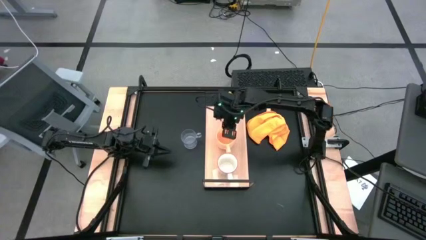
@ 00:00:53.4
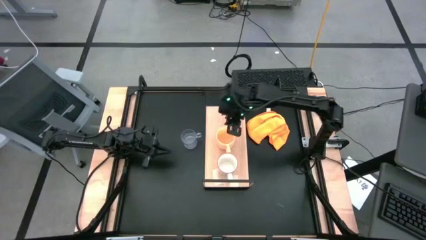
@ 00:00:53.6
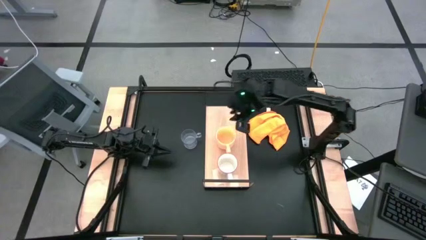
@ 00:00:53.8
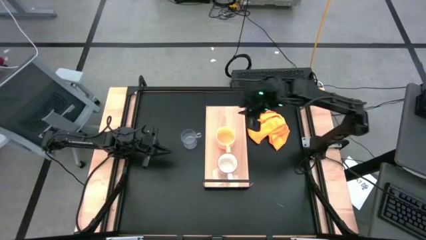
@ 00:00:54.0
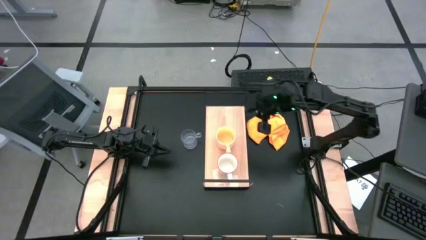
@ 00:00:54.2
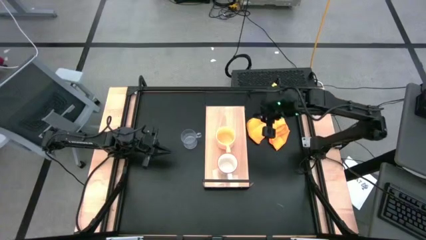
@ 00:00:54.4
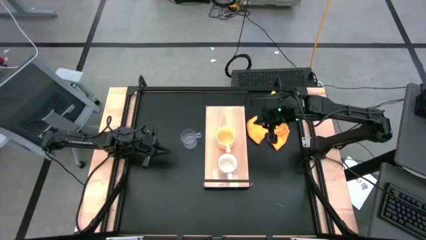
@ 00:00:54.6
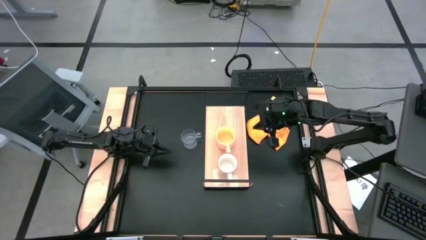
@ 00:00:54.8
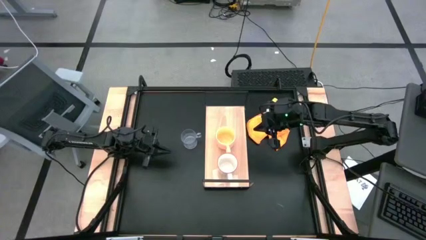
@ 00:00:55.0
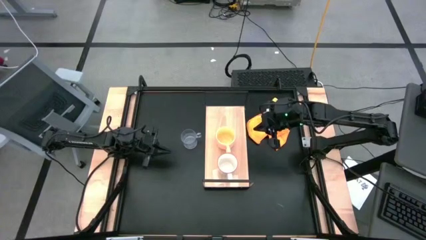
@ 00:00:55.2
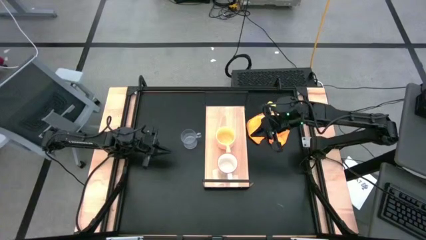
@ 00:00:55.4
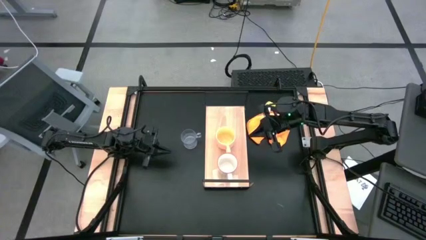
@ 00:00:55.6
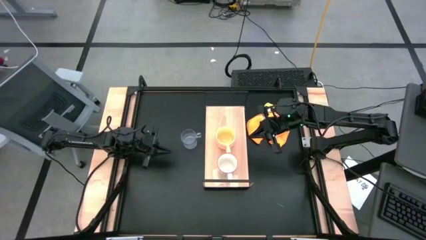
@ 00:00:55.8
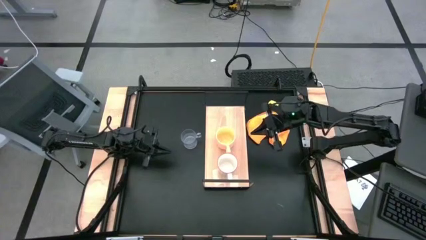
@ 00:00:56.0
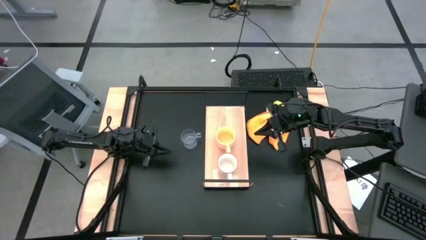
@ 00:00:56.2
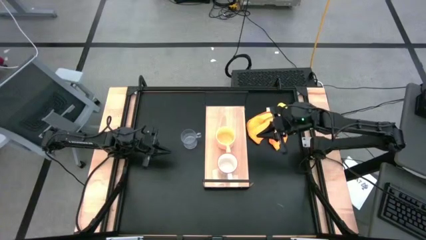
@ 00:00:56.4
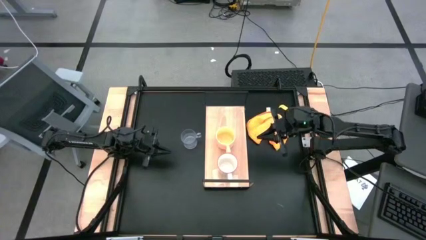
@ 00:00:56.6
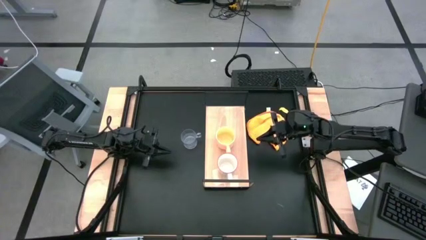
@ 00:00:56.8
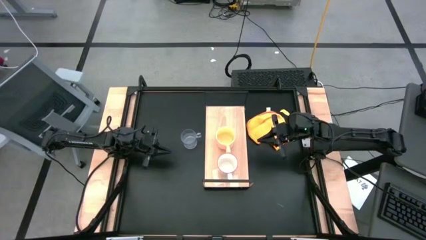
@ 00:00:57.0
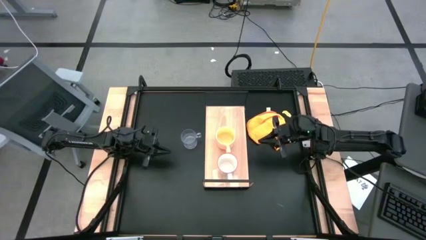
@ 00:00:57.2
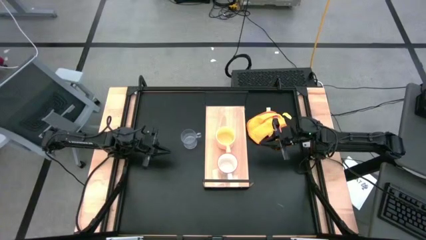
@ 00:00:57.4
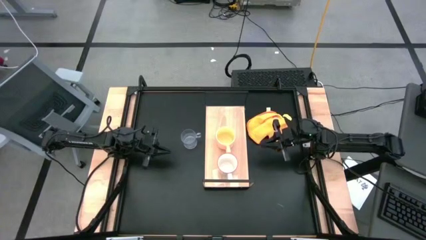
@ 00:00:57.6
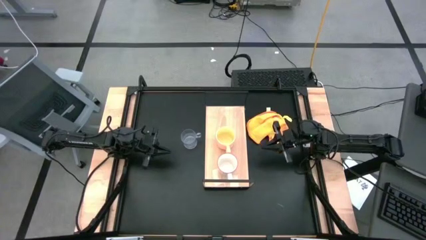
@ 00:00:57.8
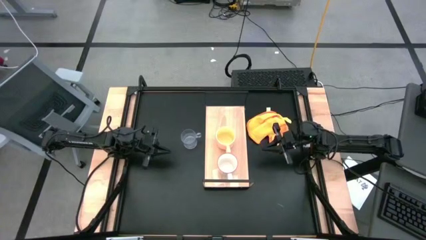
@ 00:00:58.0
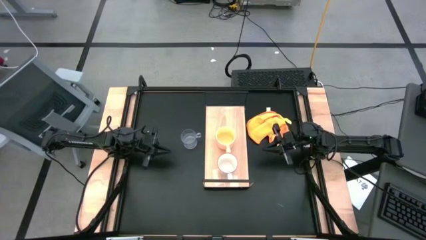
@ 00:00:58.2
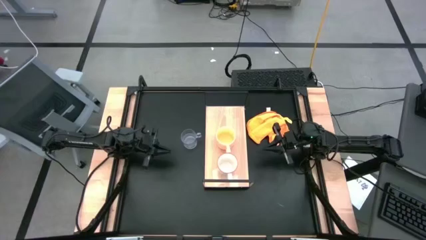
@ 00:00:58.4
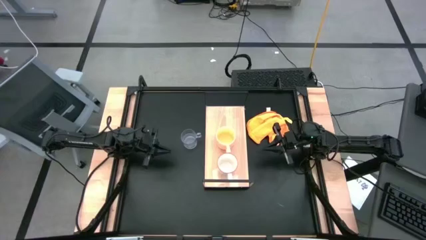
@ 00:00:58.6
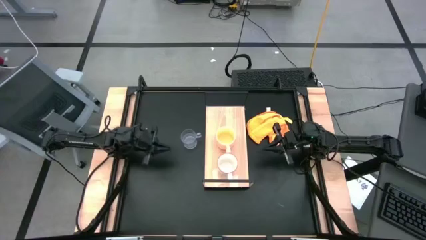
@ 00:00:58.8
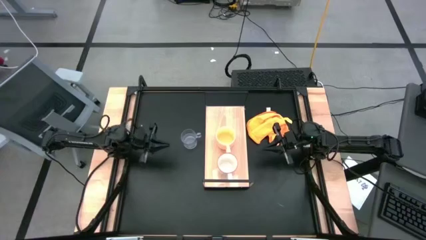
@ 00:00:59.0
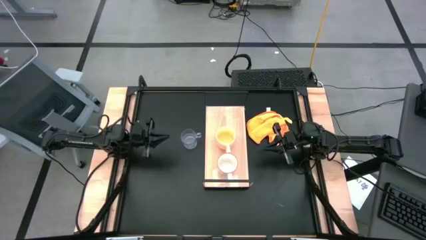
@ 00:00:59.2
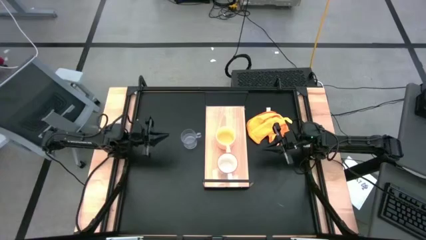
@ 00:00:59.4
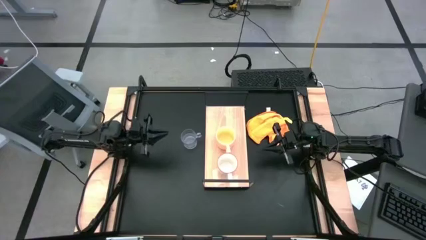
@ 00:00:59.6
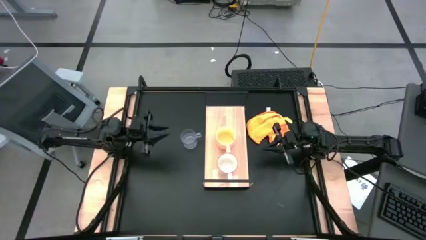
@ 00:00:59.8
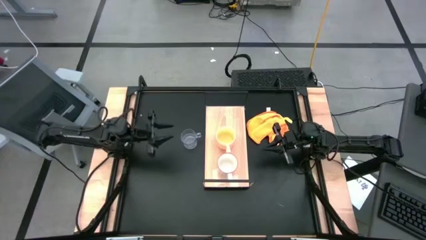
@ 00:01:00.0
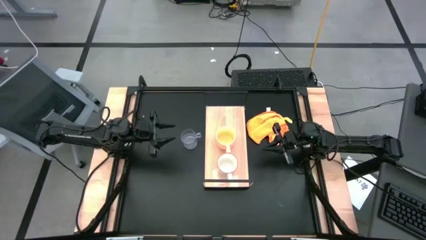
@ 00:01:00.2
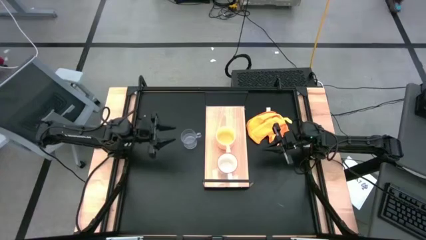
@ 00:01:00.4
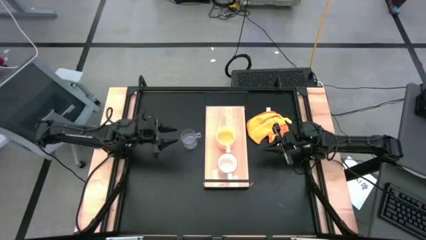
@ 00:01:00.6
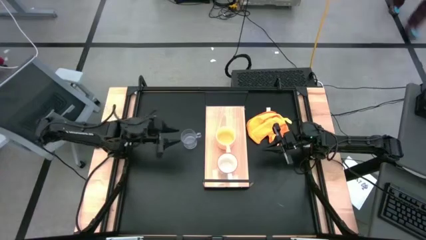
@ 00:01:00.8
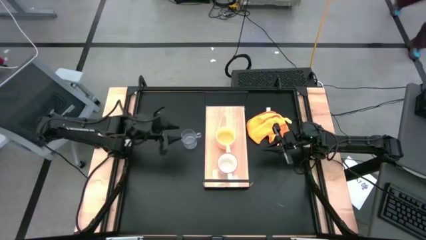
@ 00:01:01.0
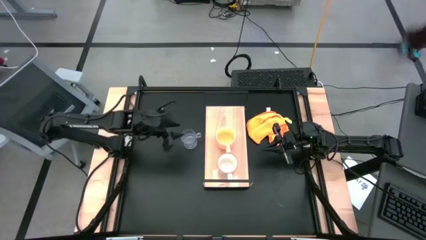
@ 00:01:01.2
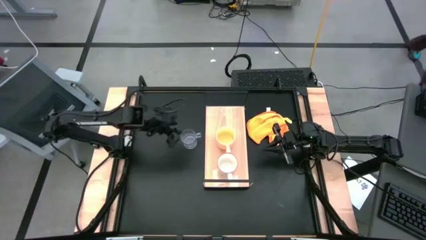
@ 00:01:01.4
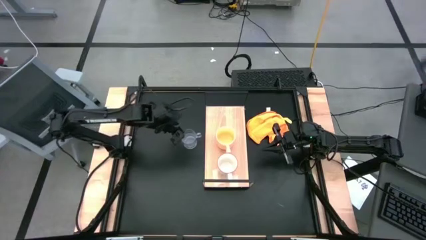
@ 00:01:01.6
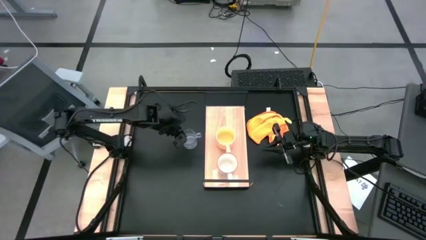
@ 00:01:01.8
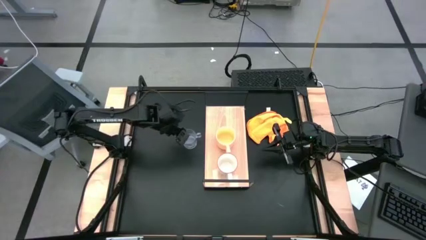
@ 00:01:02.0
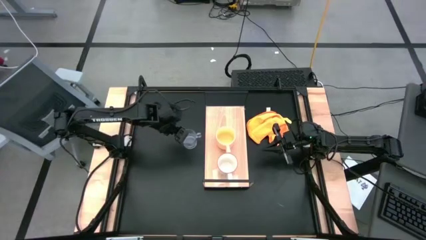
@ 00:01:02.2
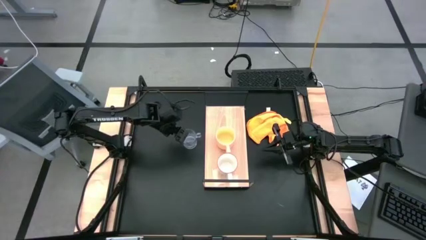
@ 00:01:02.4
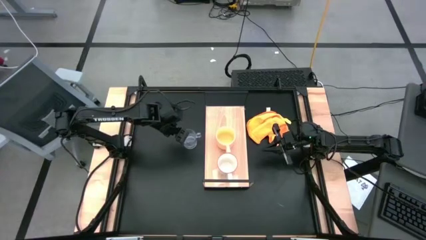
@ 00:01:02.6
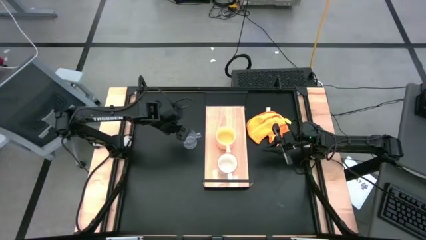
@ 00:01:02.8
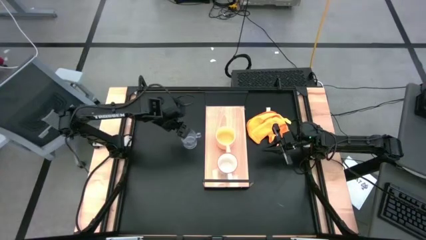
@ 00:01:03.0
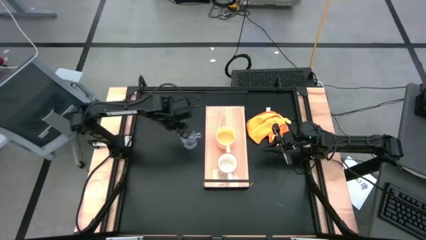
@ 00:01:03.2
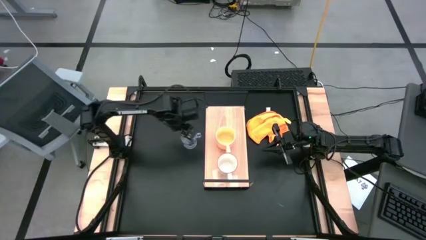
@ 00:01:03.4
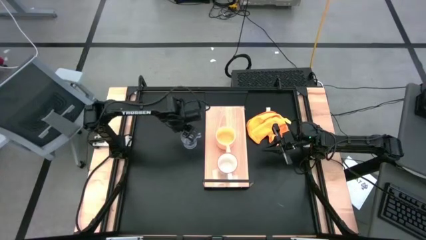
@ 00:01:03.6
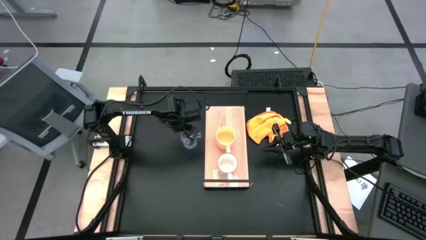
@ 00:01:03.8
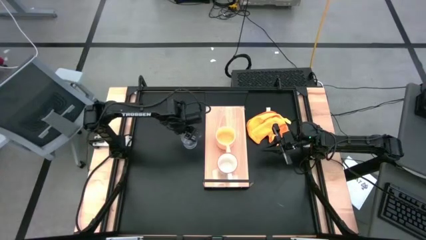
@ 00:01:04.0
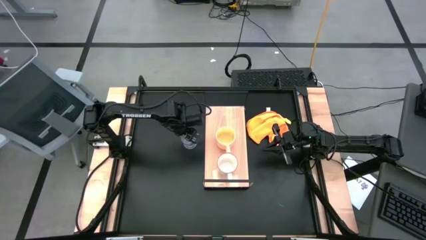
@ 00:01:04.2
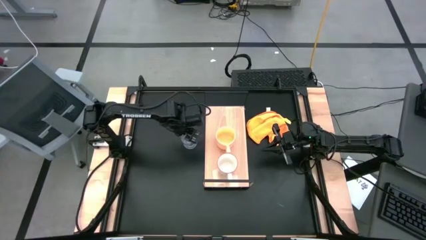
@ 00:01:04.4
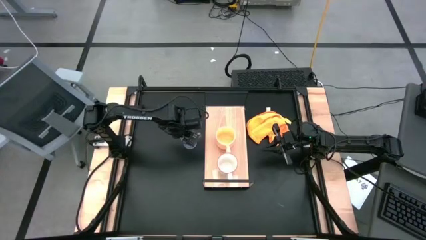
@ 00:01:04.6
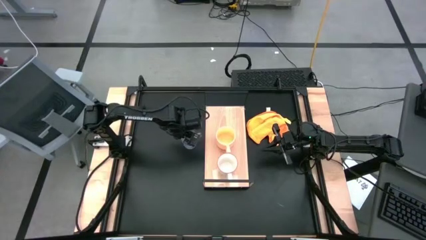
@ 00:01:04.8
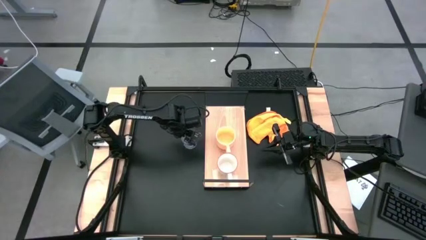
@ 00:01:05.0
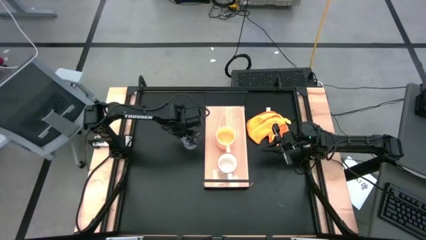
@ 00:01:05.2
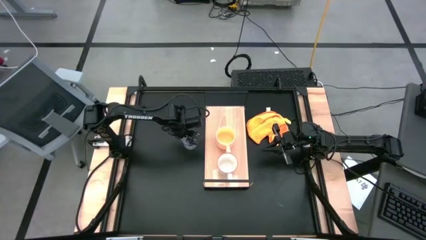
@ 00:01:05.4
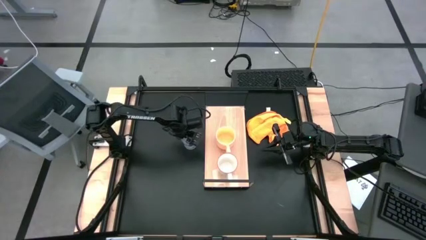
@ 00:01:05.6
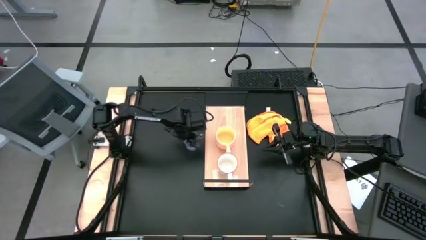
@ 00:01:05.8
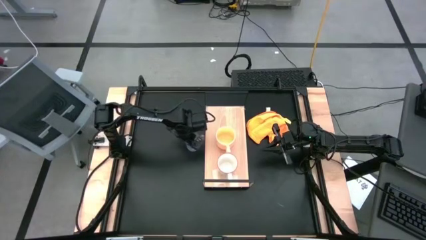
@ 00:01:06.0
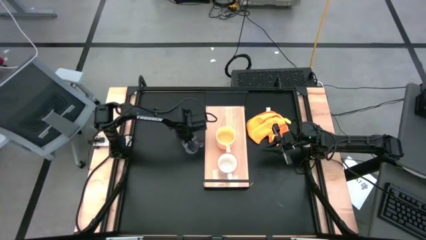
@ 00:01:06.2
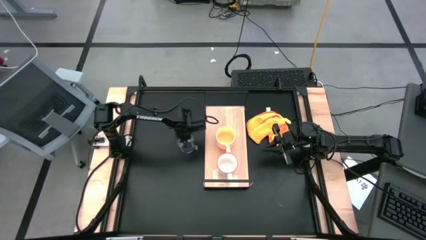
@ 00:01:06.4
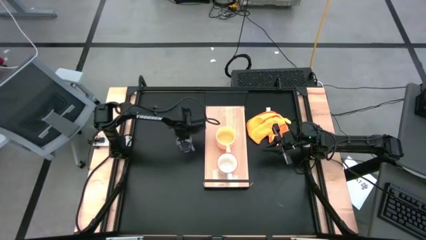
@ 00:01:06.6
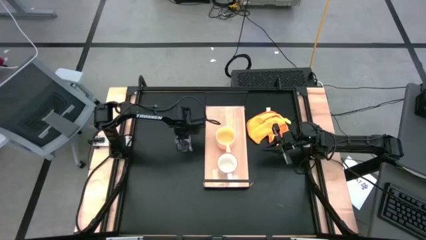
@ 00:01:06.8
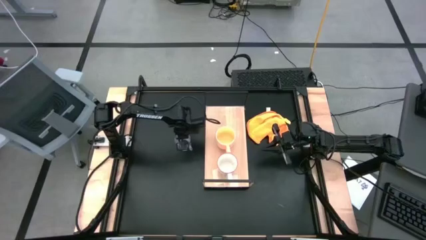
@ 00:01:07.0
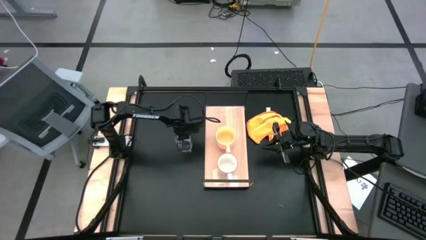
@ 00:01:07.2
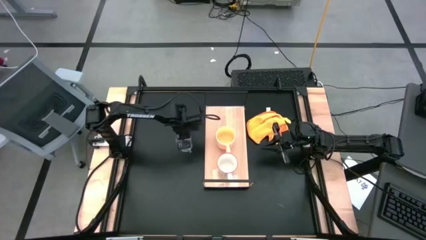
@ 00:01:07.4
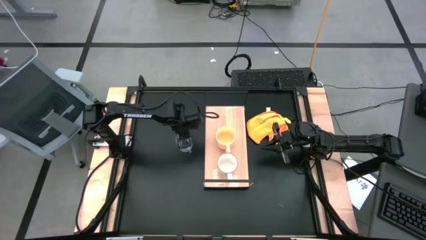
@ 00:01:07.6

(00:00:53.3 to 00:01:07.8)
Task: Stack small to large cups/mugs on shelf
Put the transparent cup on the shelf
